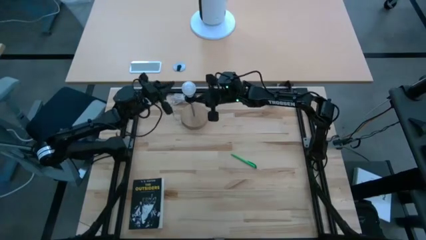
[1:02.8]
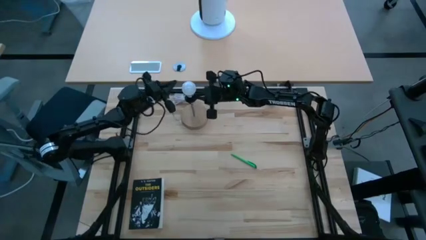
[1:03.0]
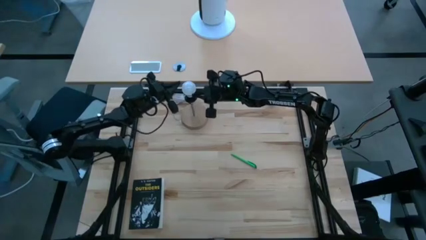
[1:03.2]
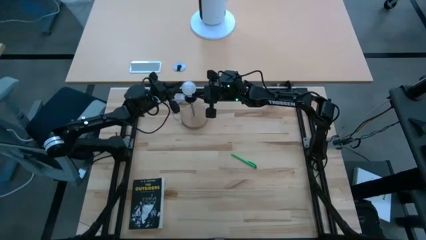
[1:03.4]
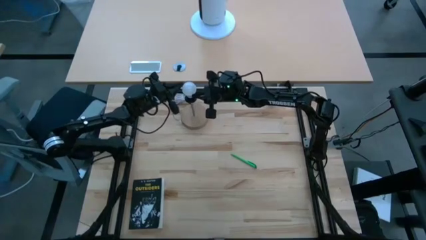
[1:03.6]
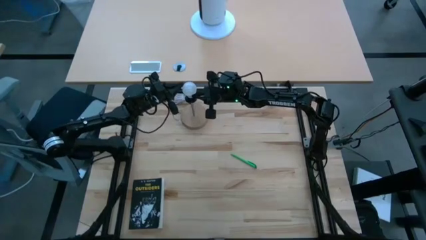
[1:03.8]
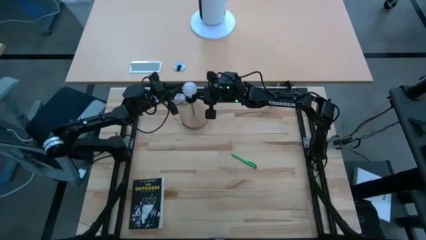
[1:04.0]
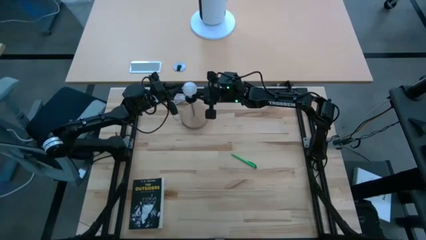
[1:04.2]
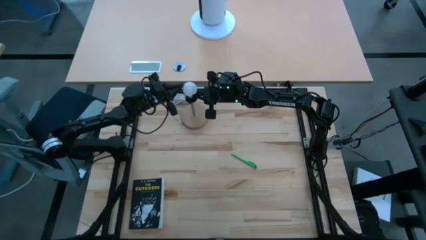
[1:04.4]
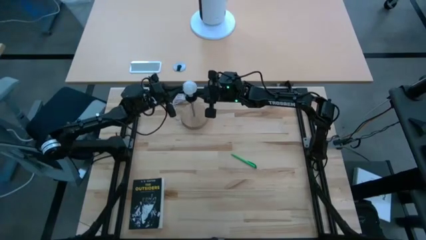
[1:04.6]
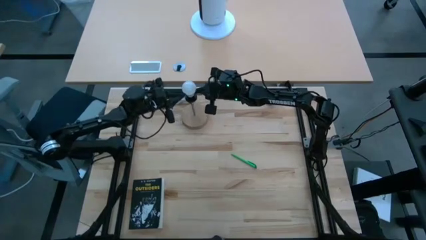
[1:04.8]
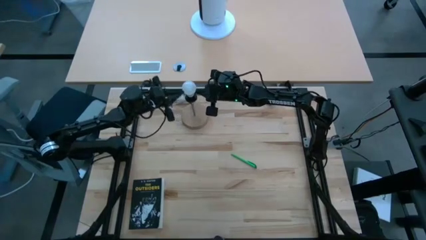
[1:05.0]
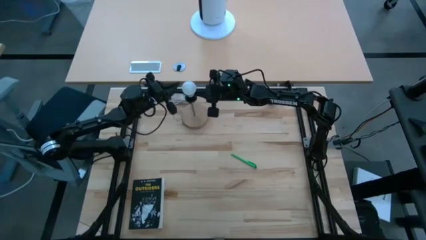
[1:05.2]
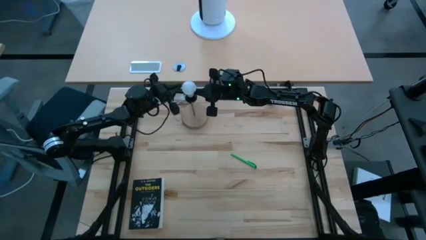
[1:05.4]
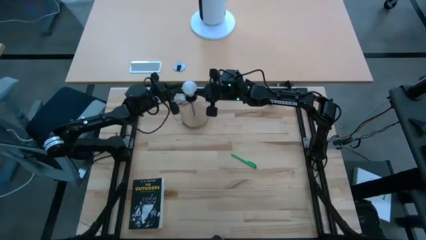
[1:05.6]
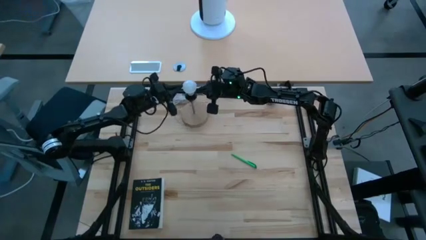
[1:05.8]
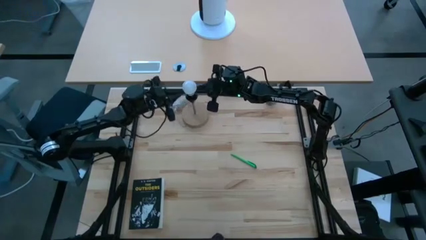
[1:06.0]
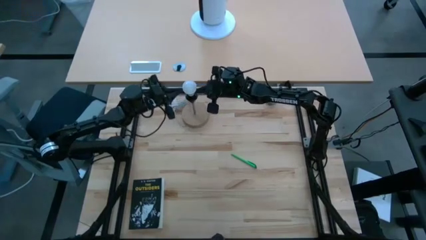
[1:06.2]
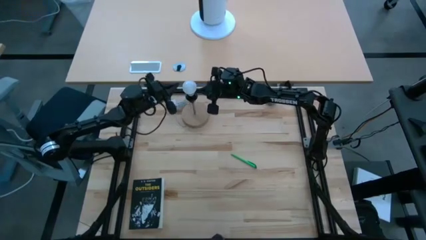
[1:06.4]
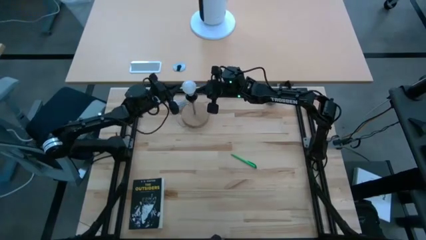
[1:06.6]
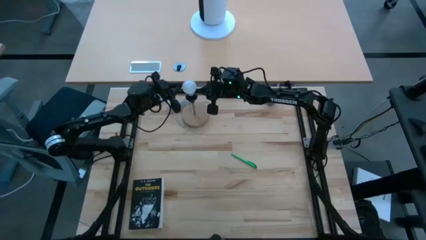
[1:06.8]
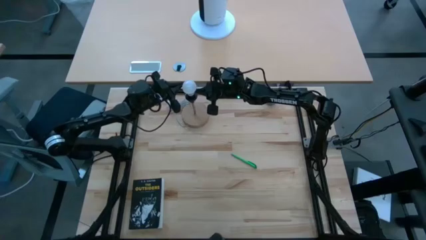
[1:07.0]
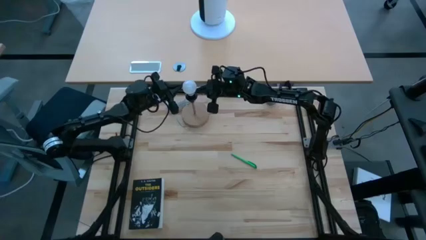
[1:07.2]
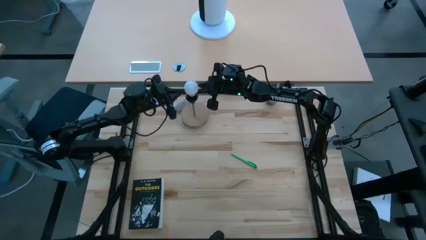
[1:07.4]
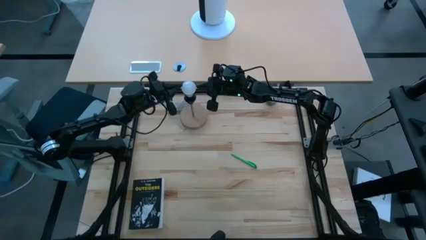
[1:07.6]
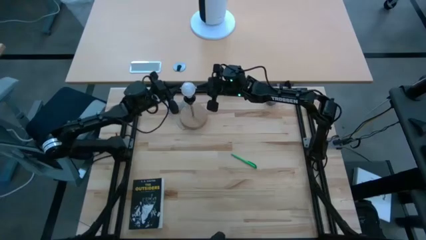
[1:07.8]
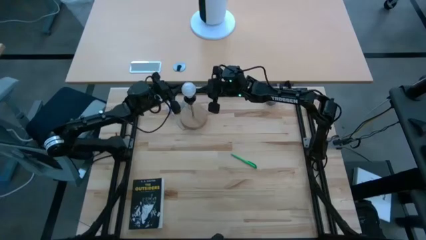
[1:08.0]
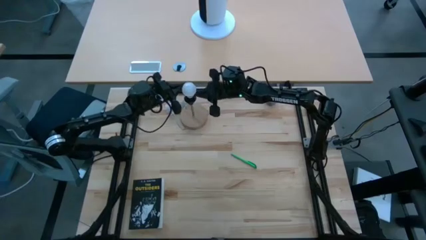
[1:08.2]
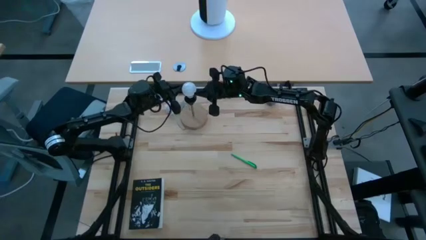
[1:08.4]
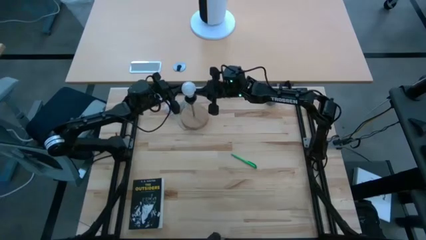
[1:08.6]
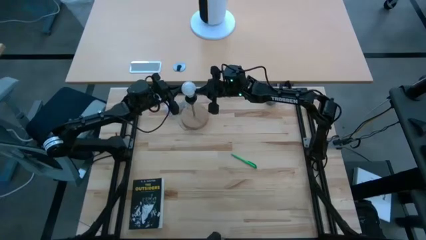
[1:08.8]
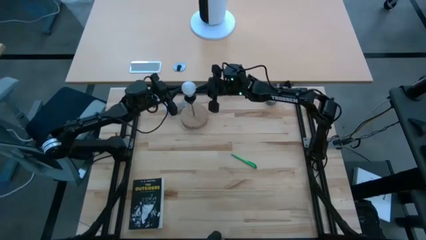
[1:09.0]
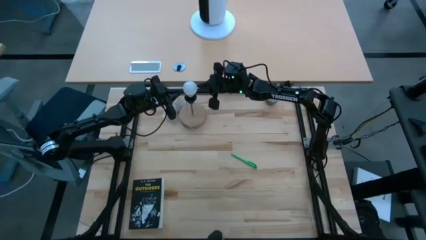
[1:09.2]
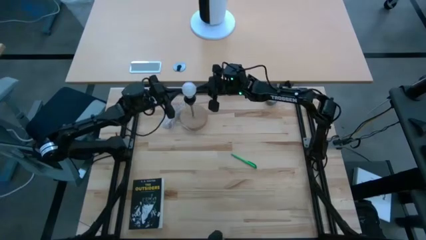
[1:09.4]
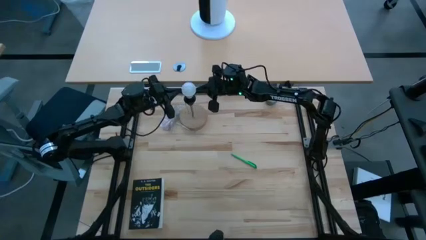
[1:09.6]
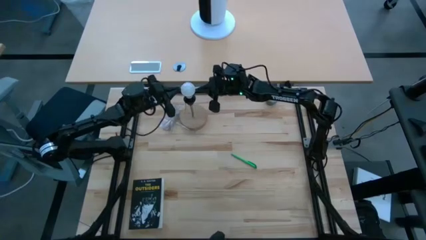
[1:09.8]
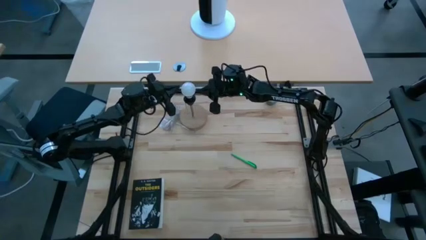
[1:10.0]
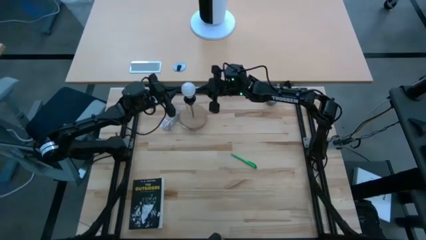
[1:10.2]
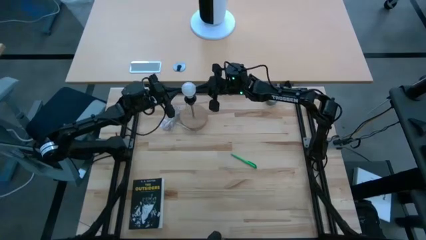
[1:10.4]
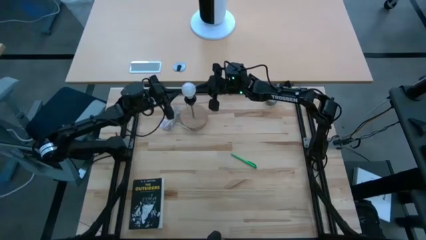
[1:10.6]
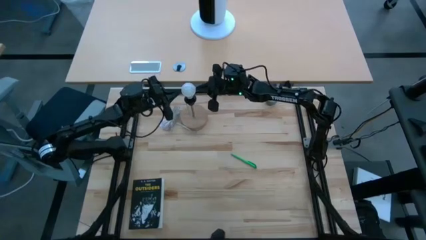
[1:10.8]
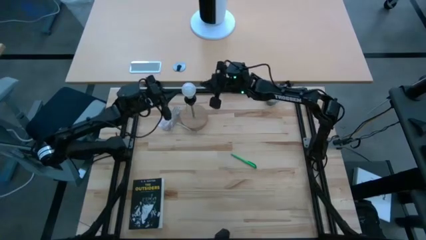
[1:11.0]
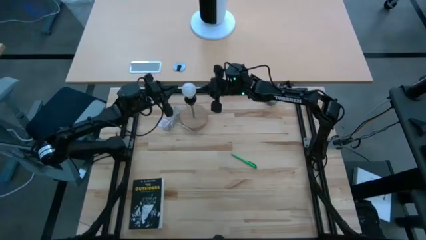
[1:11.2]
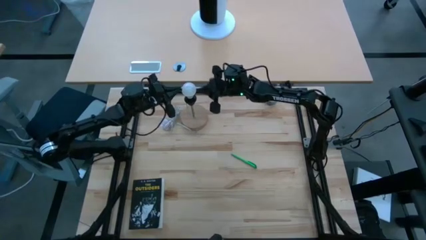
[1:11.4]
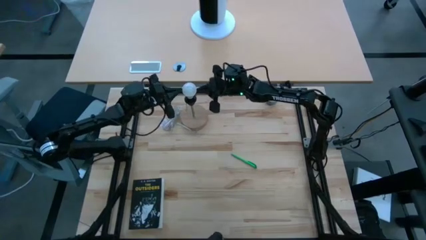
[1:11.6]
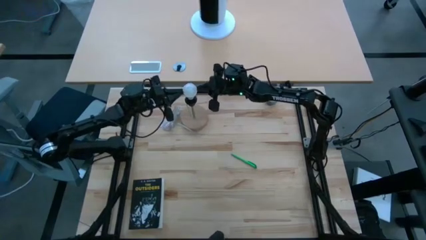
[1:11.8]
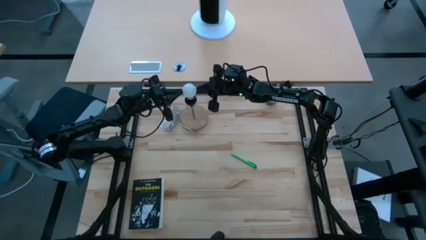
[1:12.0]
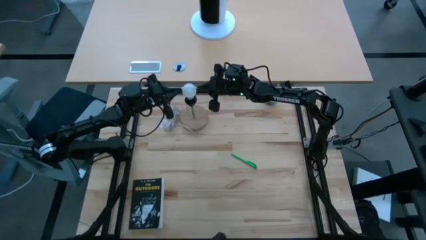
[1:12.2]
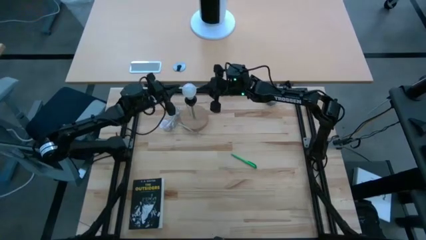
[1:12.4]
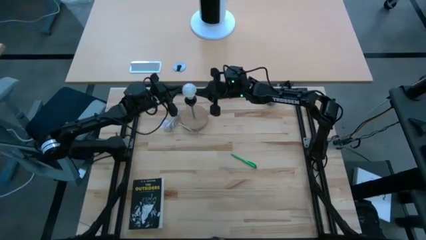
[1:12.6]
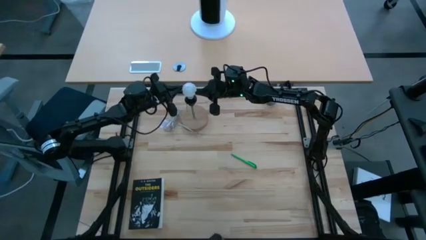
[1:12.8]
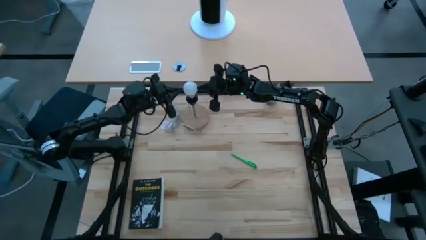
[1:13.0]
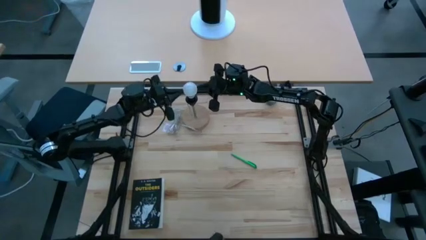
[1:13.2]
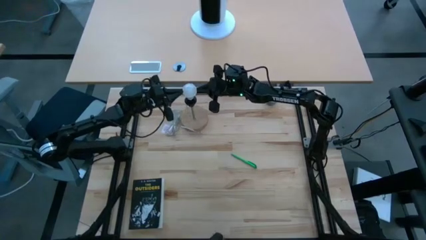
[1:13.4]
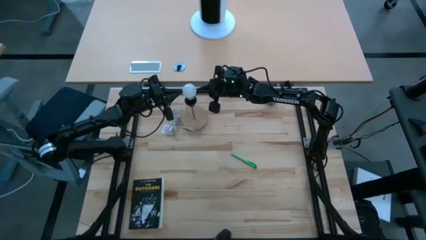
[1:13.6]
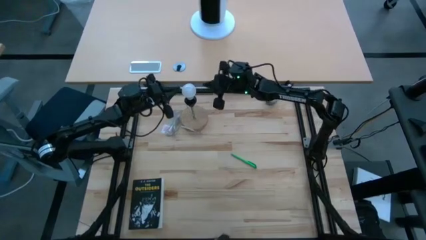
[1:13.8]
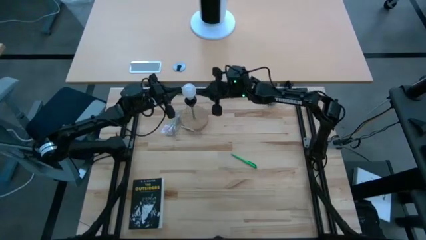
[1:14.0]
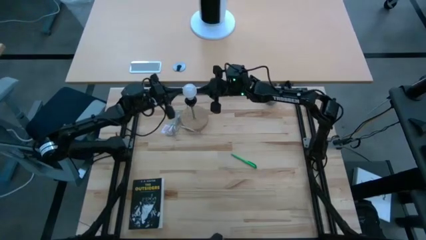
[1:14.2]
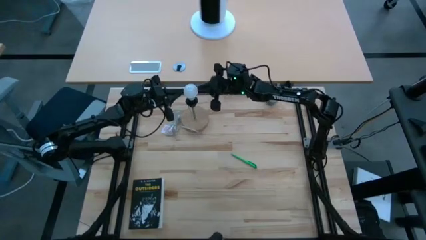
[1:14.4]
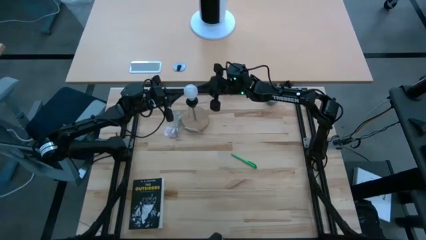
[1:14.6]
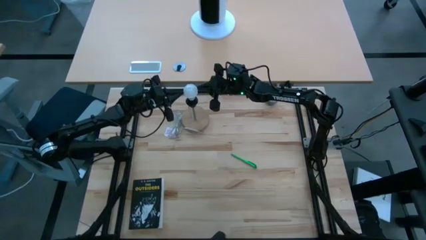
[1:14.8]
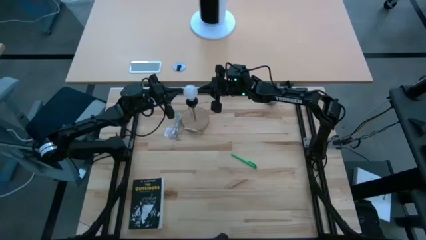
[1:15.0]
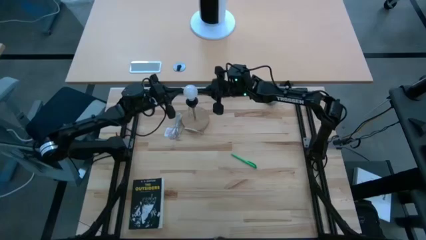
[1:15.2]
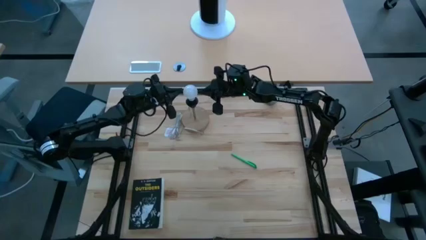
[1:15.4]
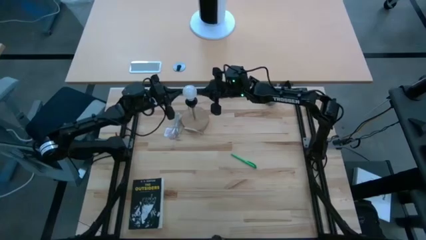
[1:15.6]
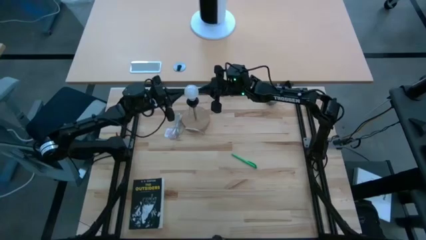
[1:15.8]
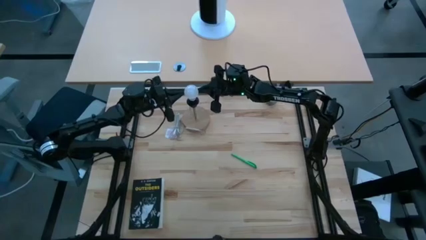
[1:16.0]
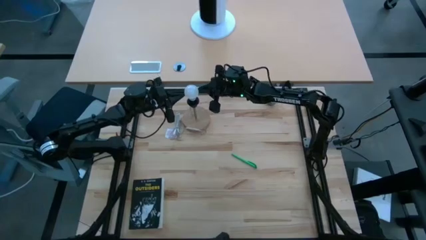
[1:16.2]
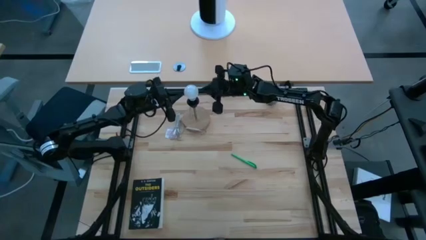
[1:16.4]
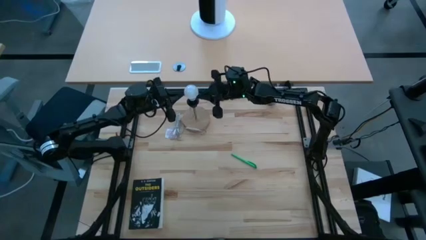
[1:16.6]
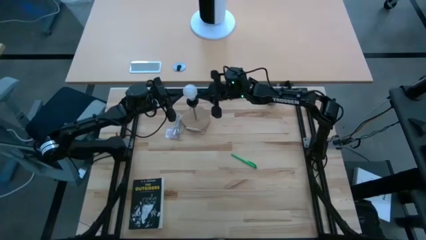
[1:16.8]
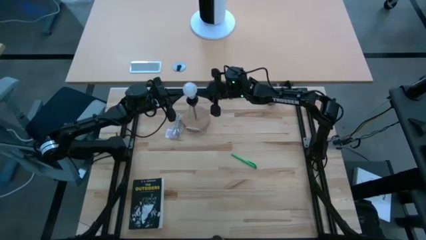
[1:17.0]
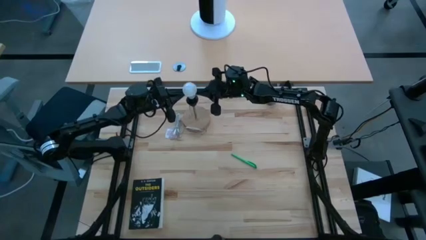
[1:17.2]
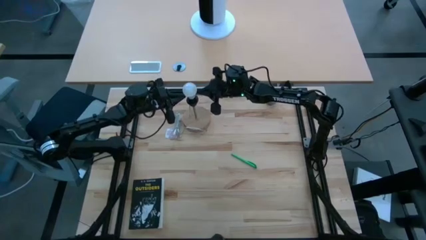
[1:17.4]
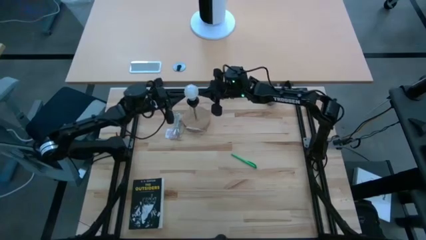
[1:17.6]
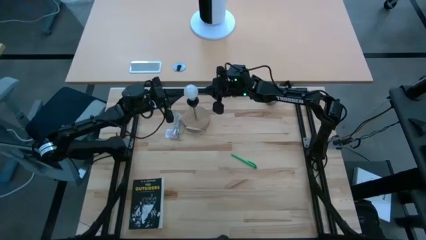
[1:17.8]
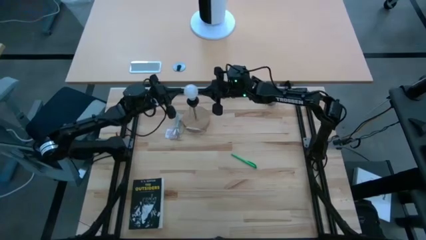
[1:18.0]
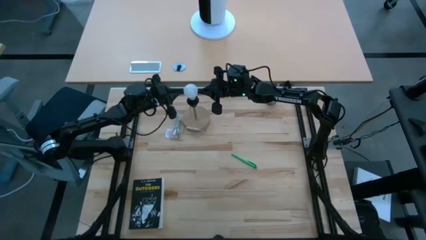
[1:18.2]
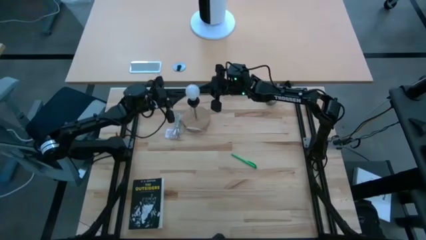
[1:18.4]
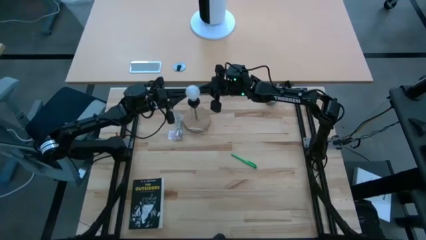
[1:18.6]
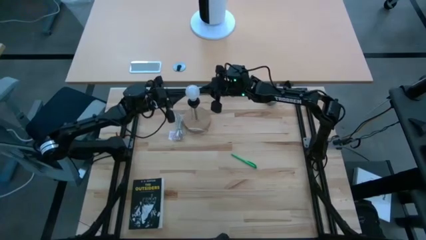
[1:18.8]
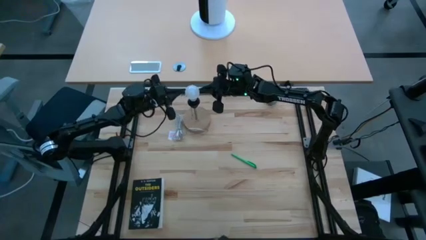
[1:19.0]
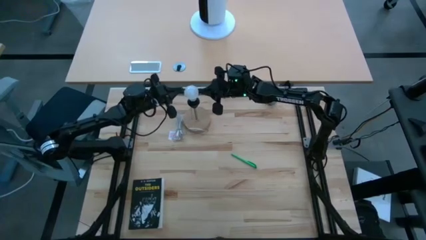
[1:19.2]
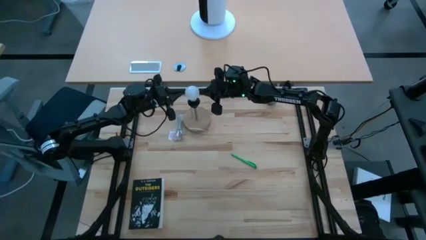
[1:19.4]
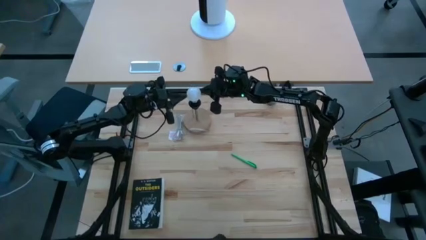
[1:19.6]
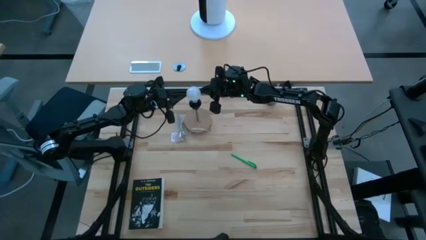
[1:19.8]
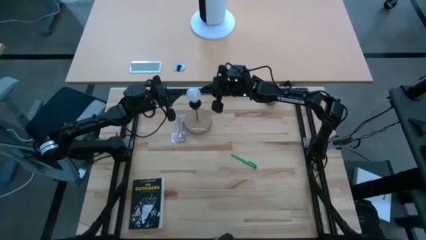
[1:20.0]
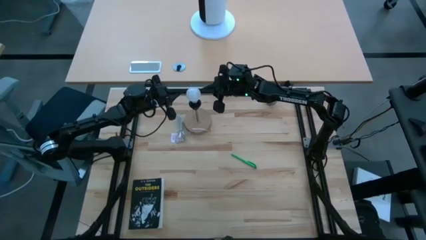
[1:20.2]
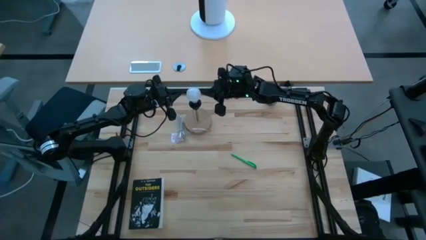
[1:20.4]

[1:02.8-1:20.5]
Task: Screw lightbulb
Remove the lightbulb from the lamp
